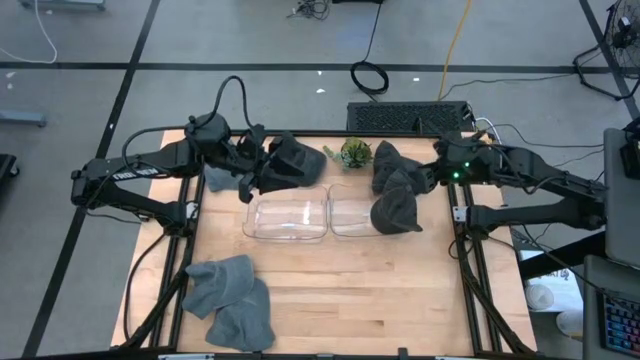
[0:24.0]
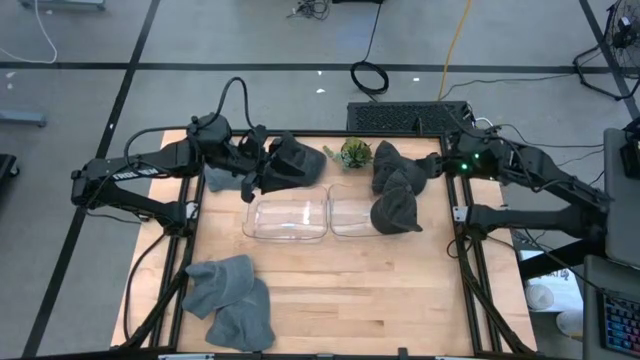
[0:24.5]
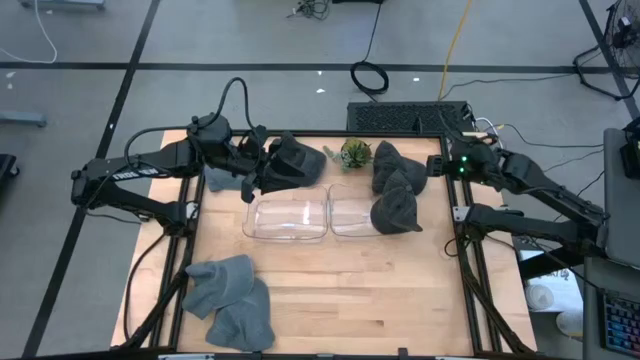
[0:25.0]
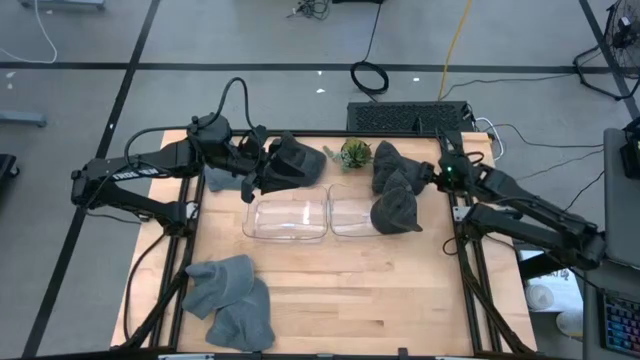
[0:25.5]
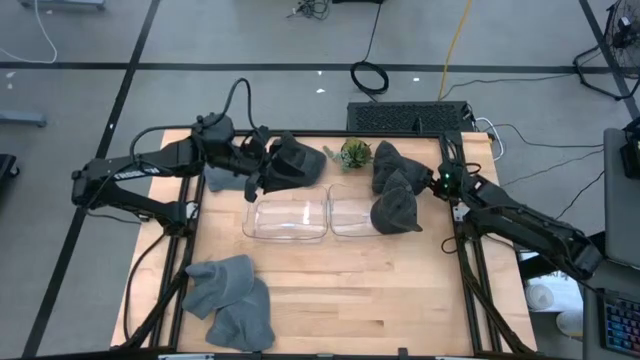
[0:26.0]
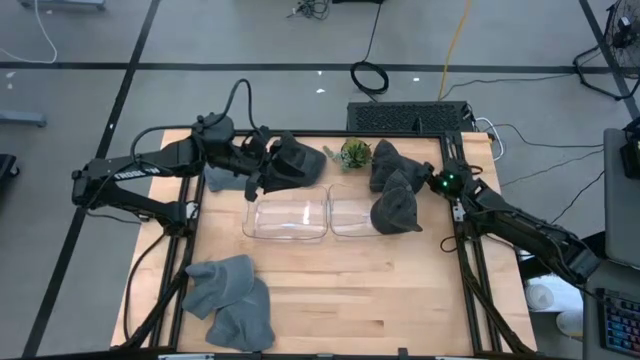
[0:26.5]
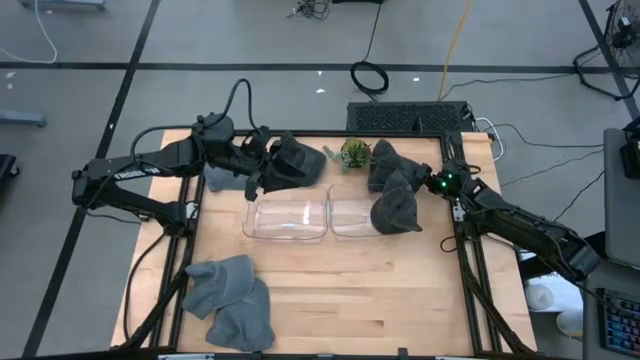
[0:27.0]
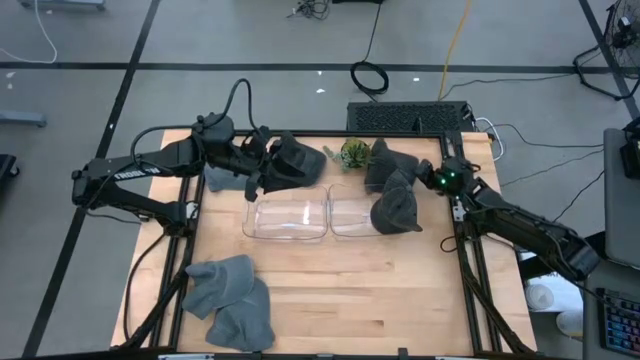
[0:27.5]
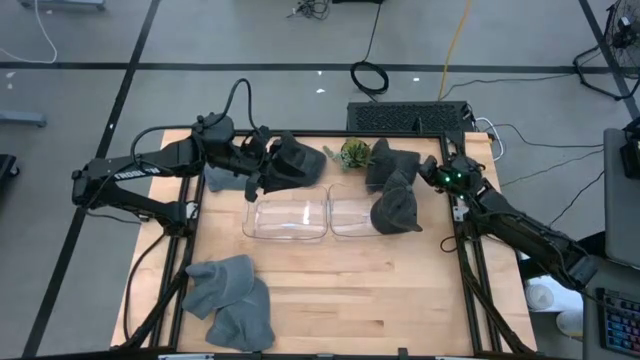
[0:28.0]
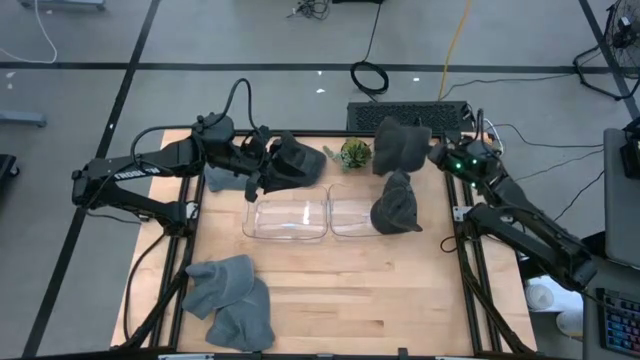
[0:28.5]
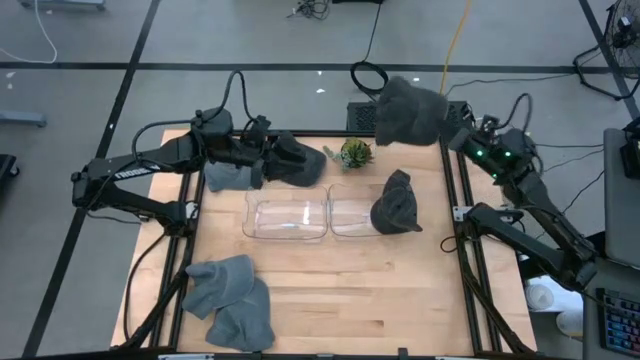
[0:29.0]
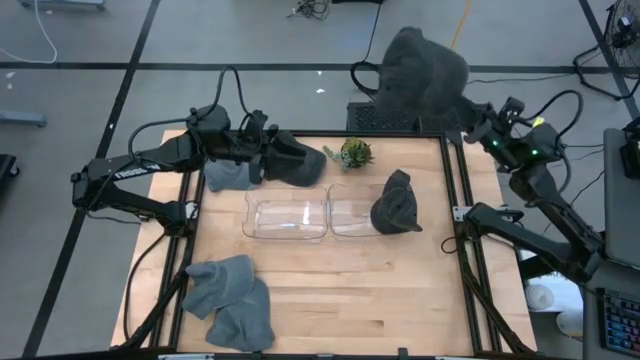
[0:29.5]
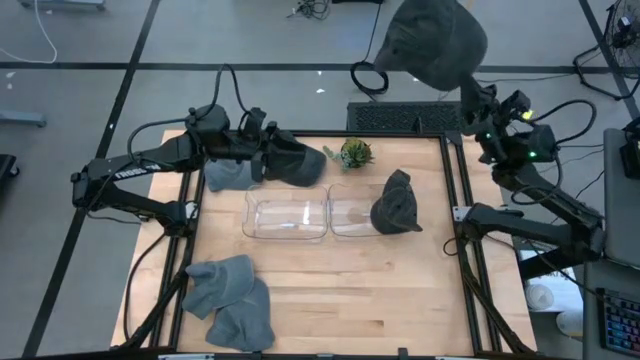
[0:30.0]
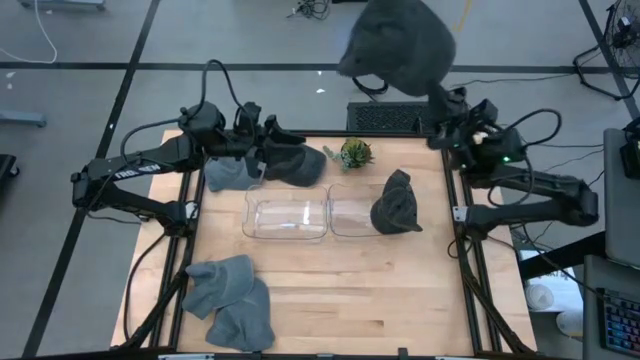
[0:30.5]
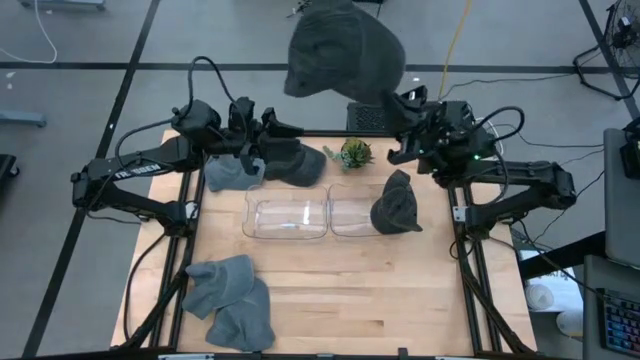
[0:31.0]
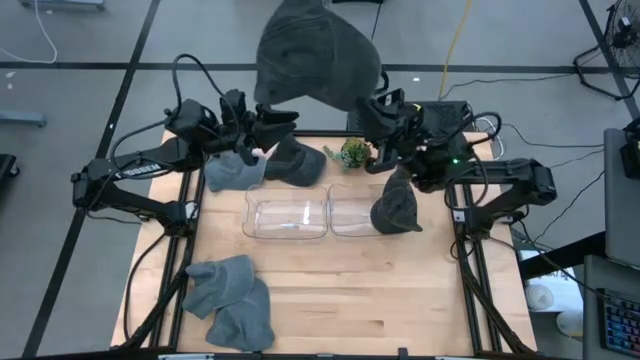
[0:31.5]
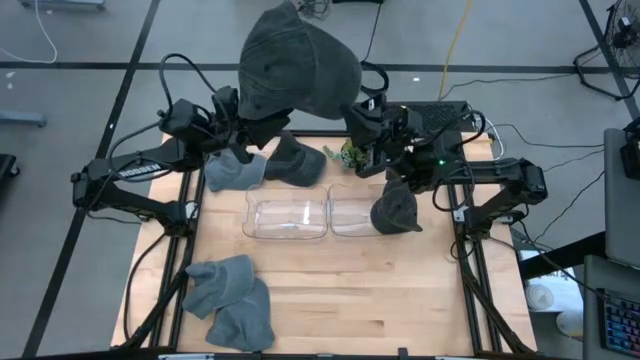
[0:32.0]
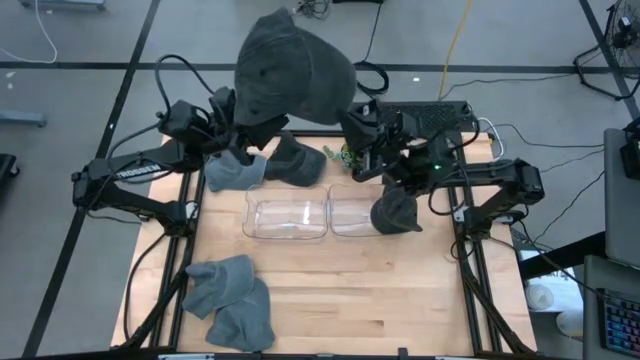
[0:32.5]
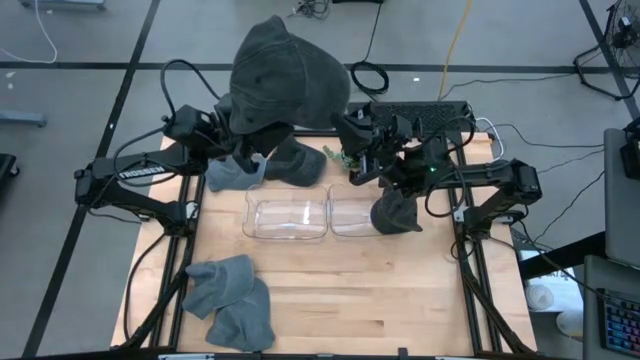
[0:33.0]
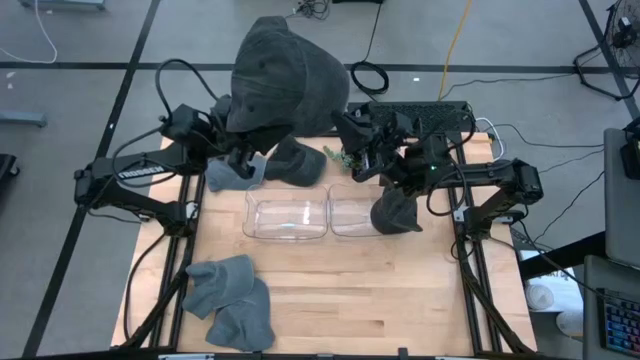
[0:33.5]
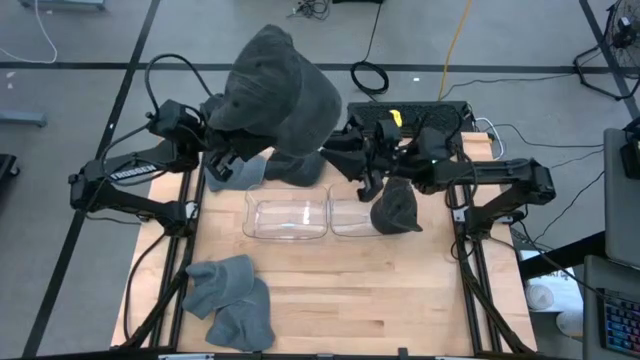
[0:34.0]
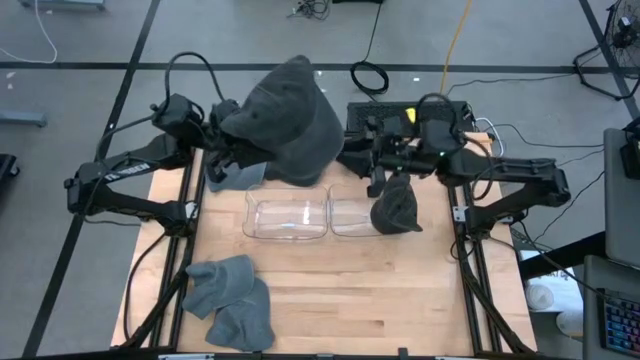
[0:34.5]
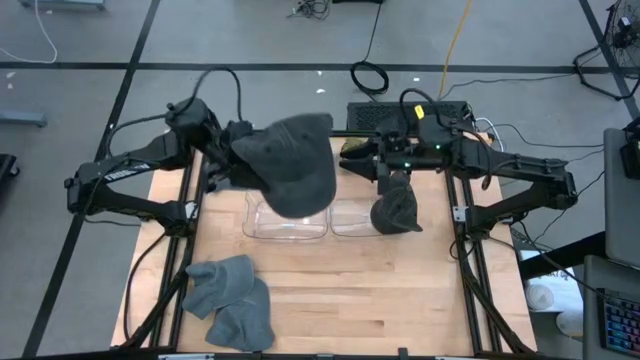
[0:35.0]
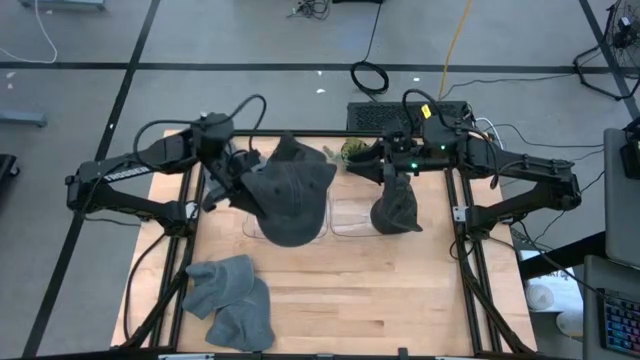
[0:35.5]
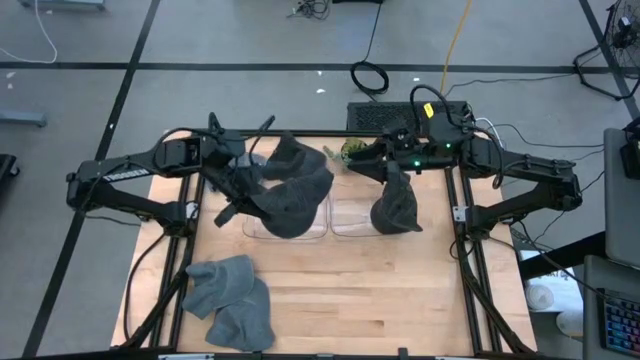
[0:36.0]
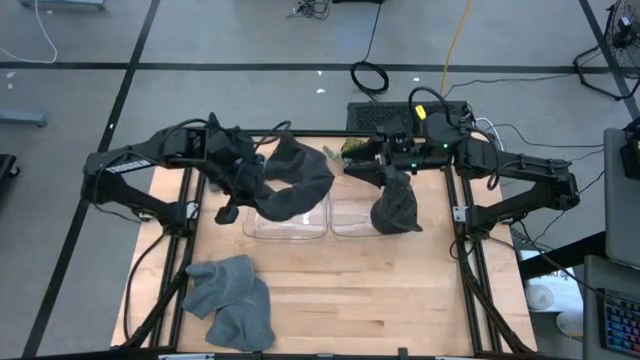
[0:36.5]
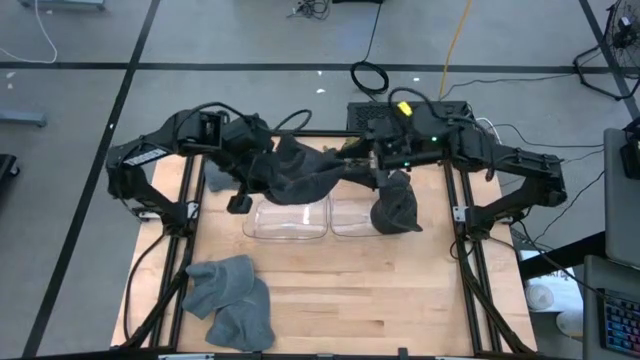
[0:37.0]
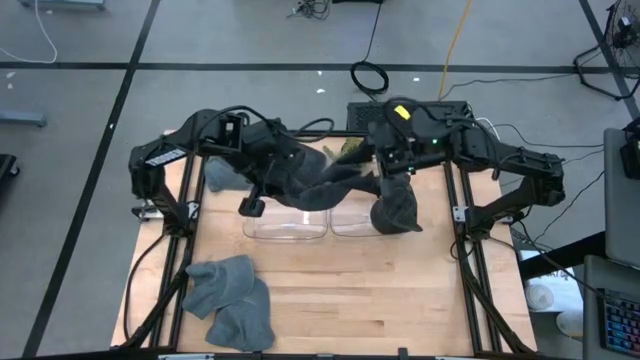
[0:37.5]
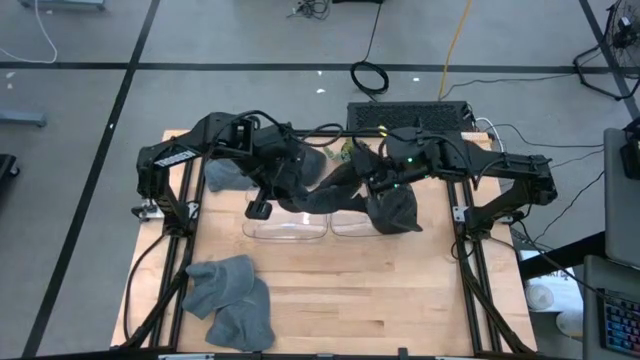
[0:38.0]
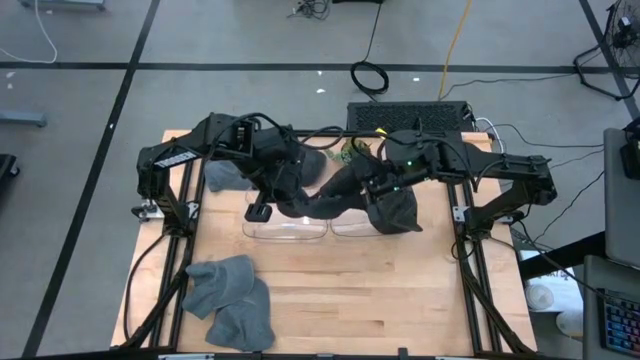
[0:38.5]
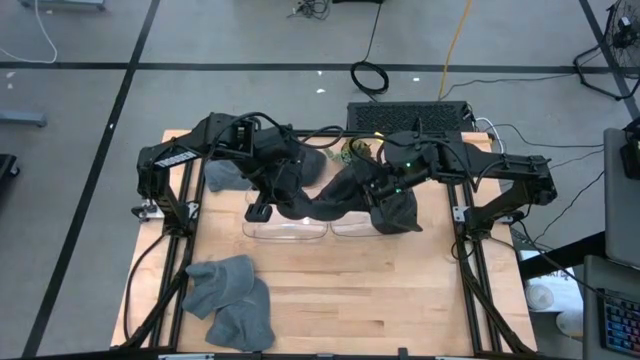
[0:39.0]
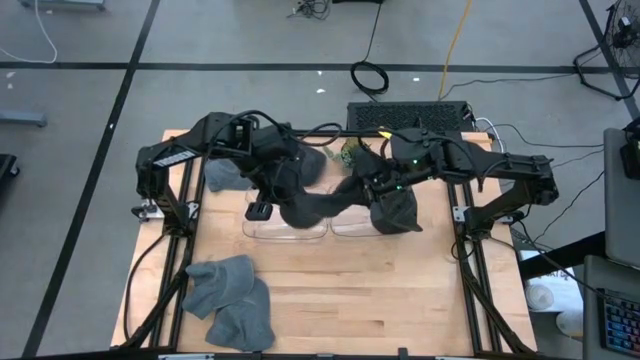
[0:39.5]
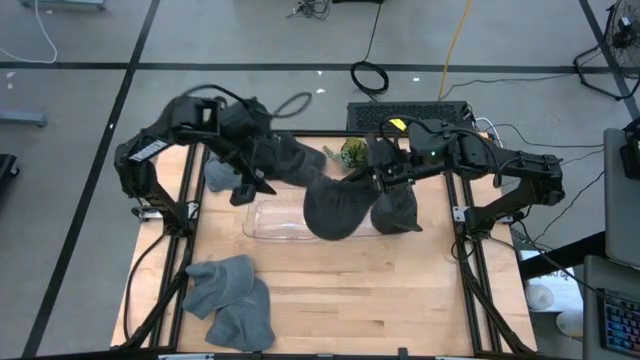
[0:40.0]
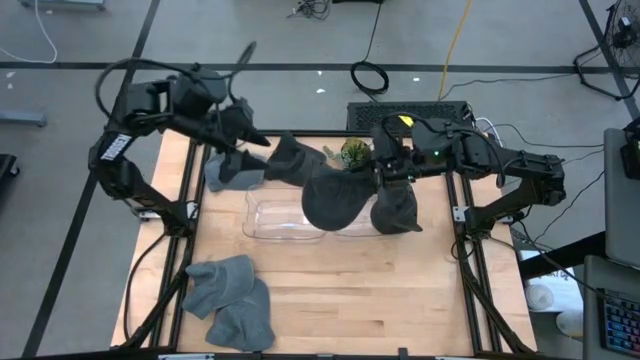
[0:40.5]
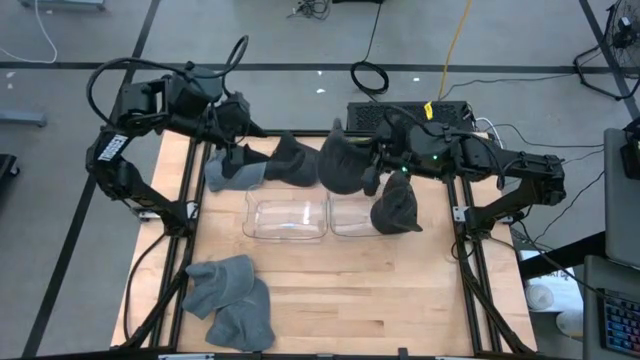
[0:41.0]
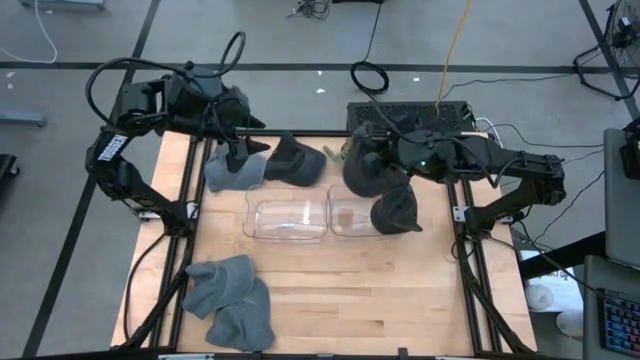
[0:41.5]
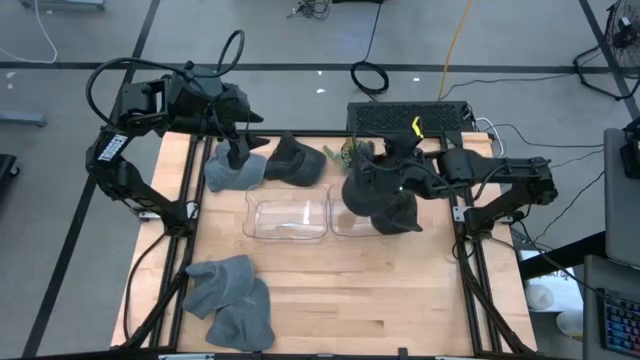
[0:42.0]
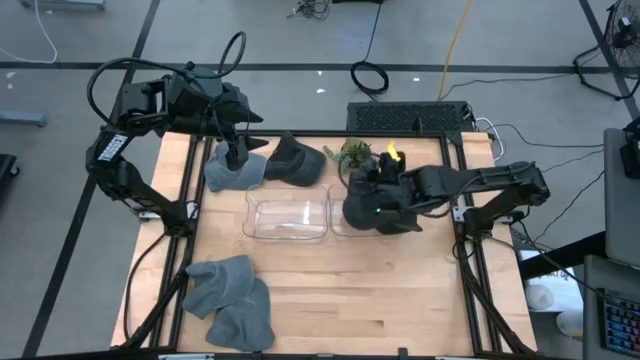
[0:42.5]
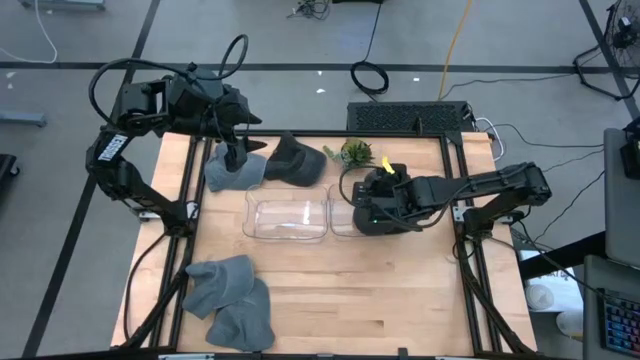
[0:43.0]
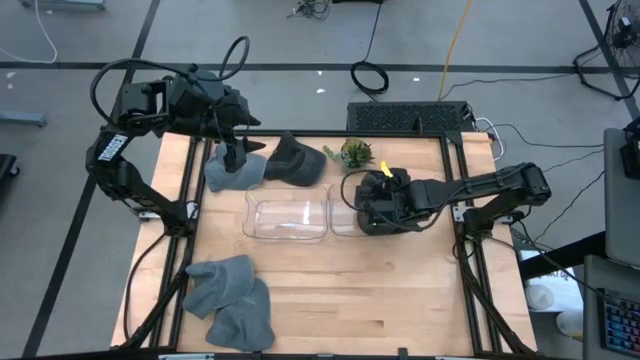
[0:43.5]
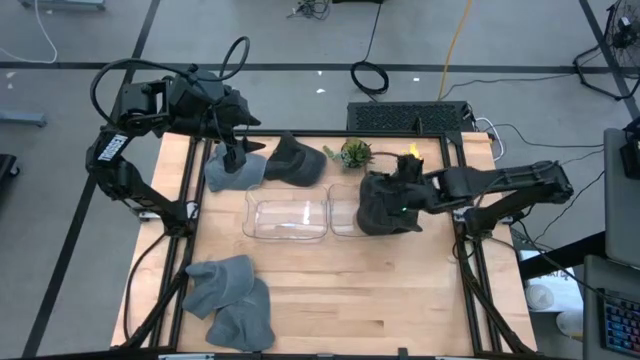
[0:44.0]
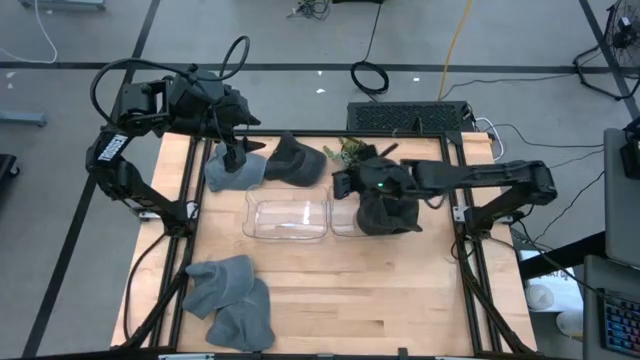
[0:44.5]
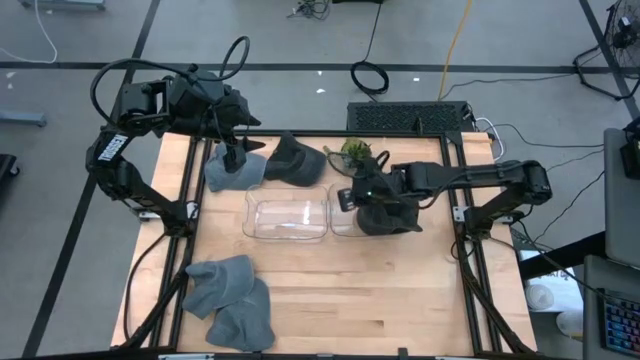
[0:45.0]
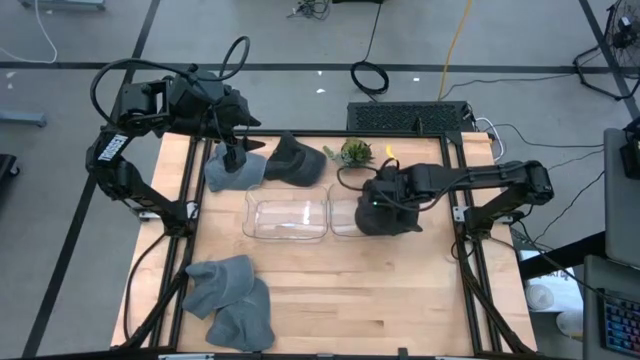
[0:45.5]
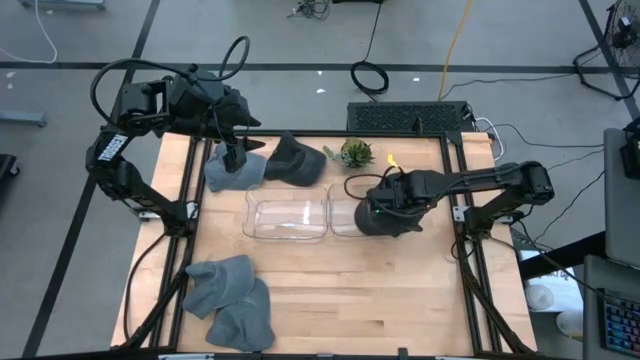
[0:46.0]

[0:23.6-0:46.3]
Task: Pick & Place hat
Put the right black cap into the right transparent bin
